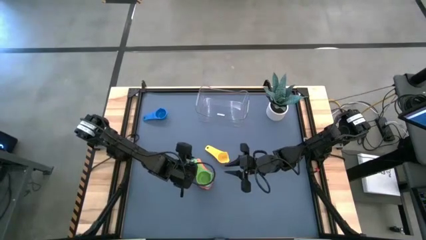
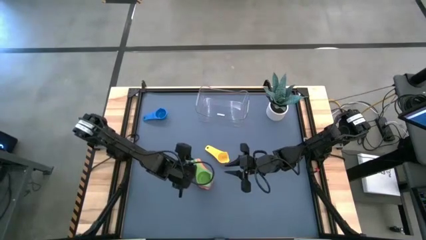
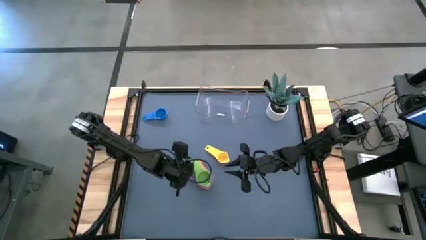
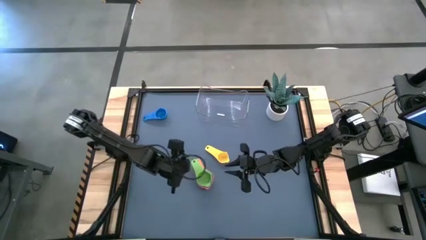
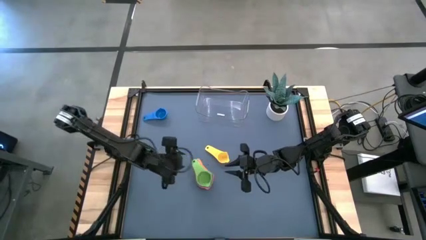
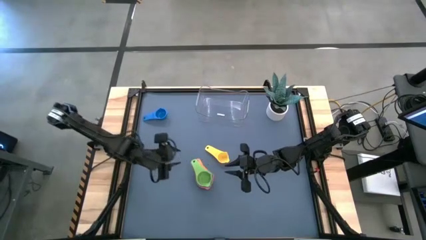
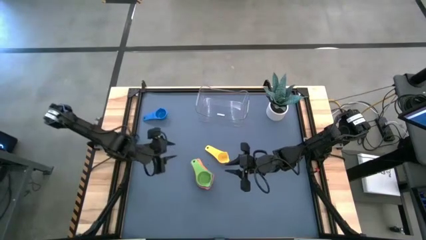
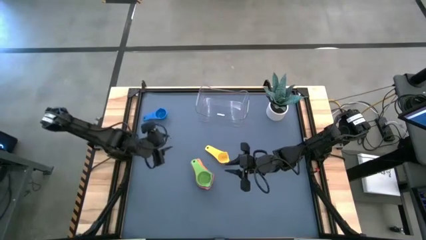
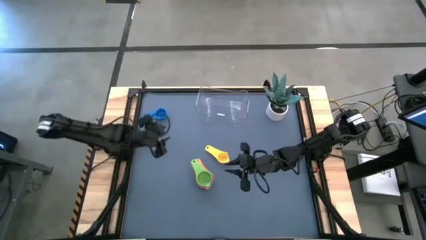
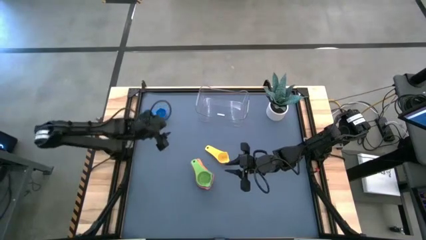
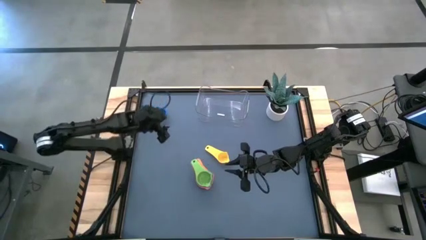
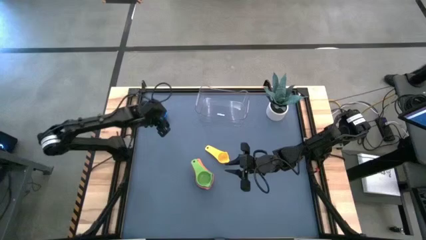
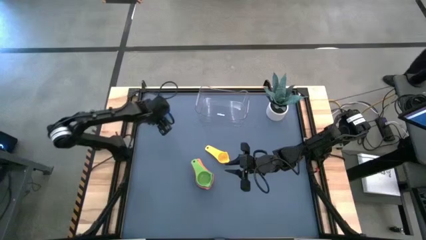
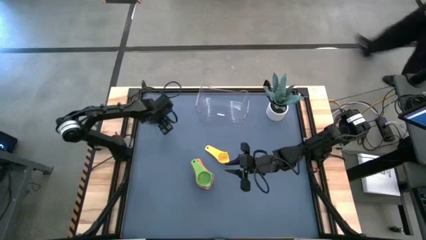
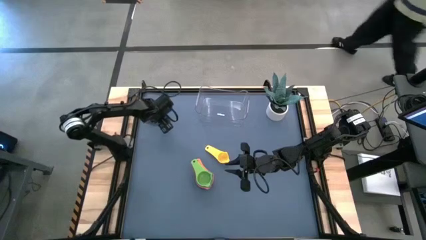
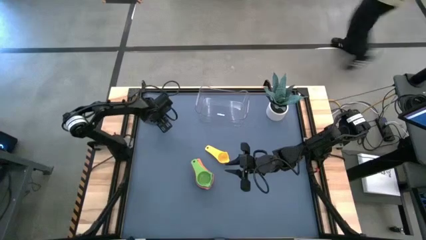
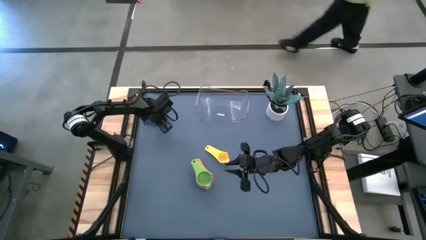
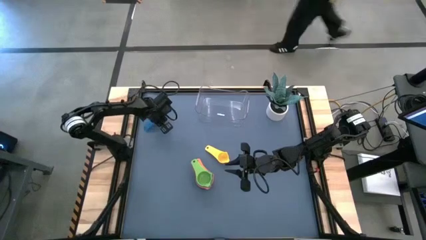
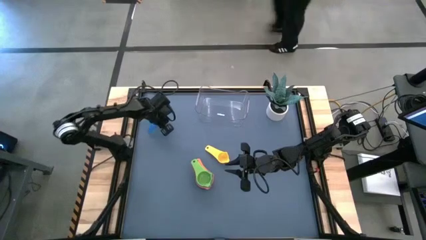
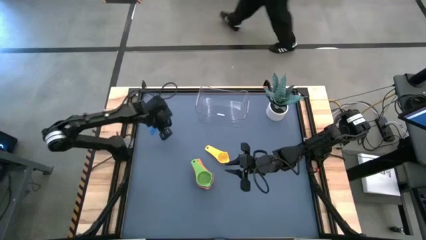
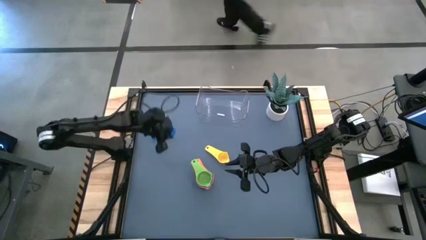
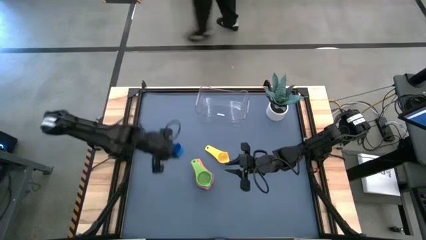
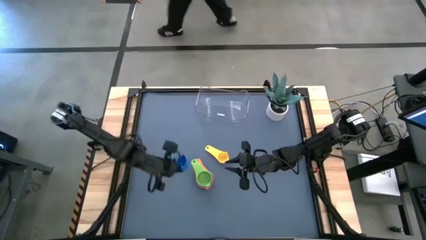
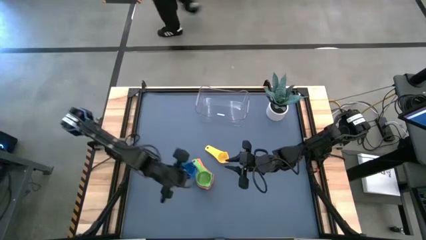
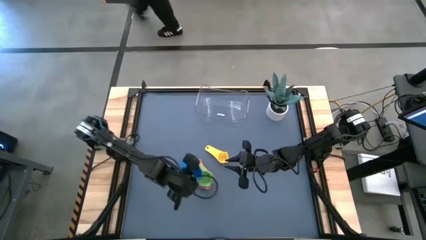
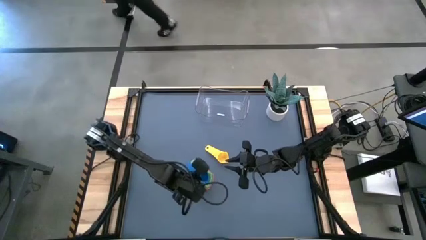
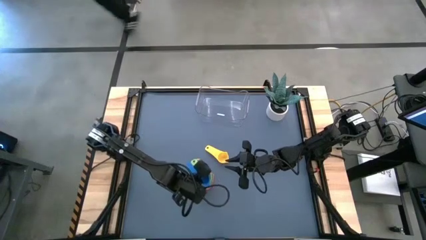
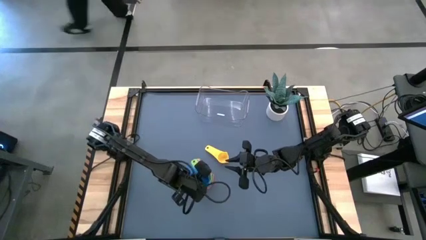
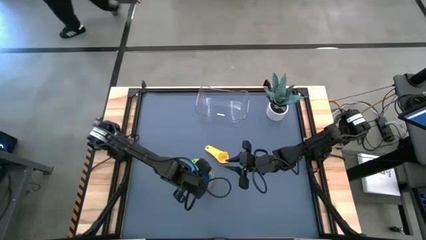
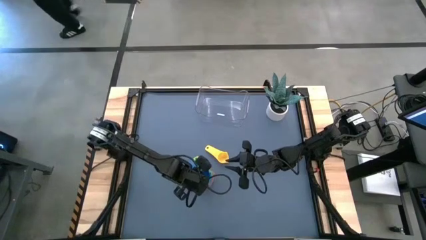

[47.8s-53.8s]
Task: Nest measuring cups in basket
Stack the blue measuring cup on top of the green measuring cup

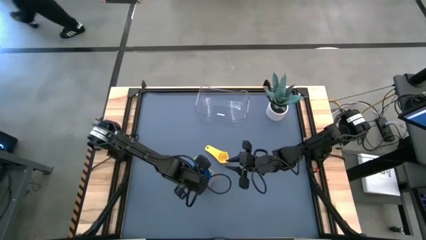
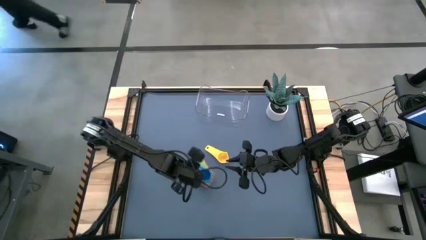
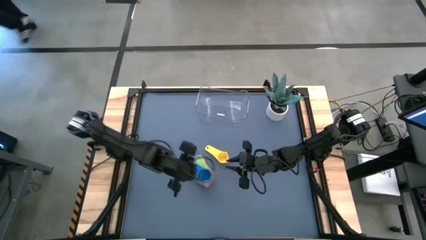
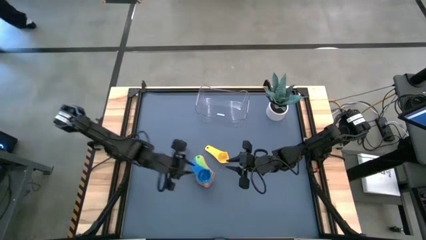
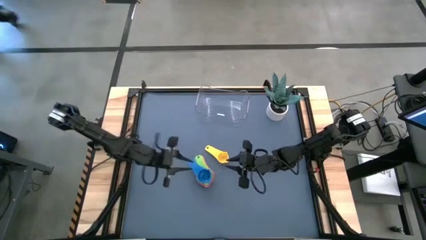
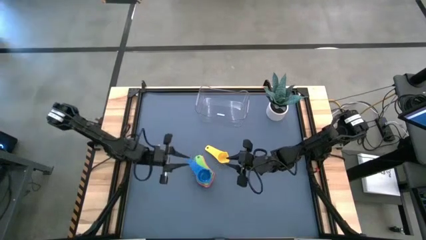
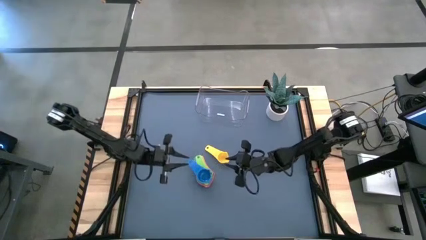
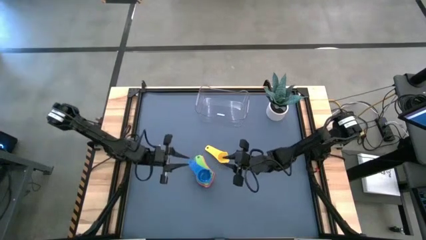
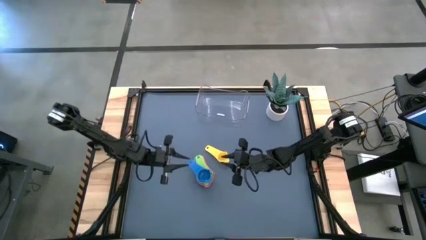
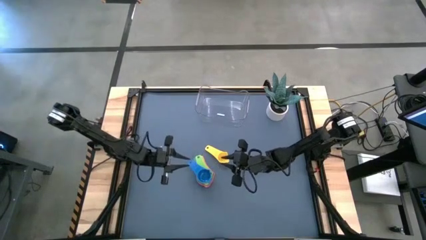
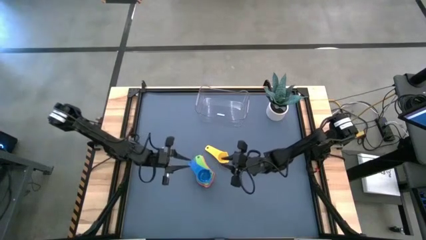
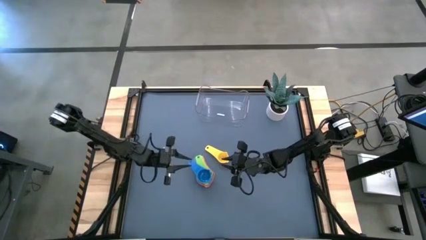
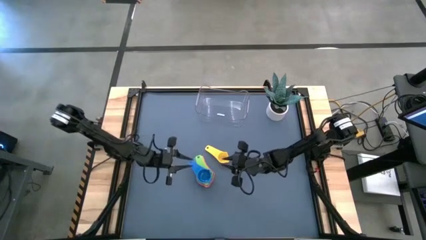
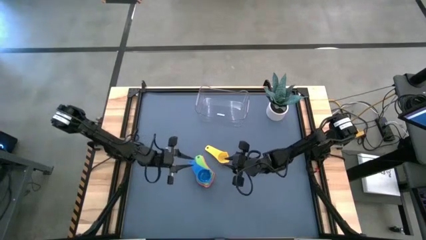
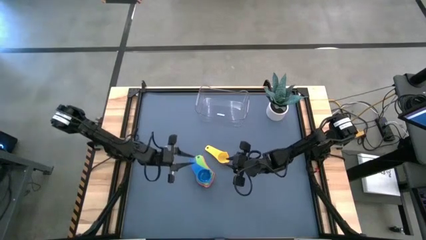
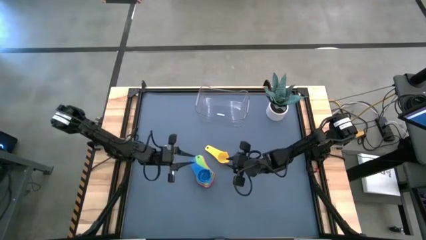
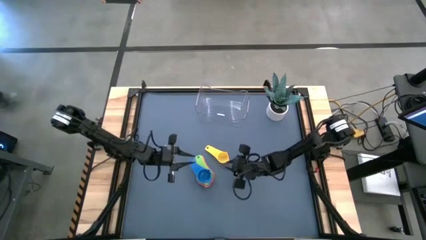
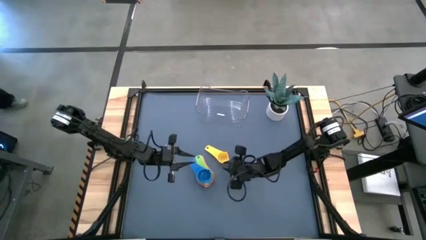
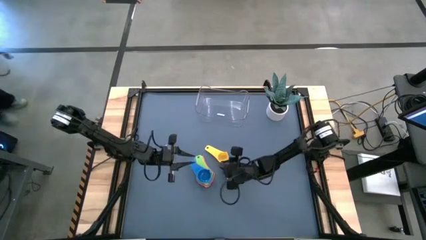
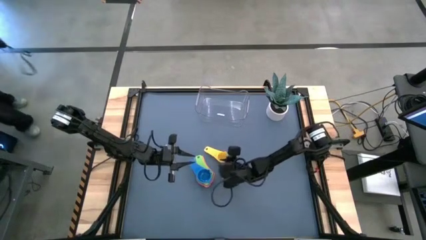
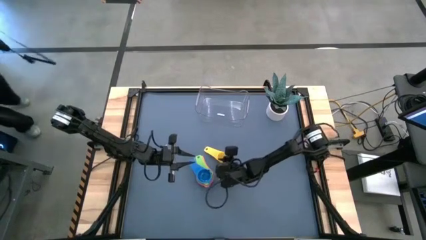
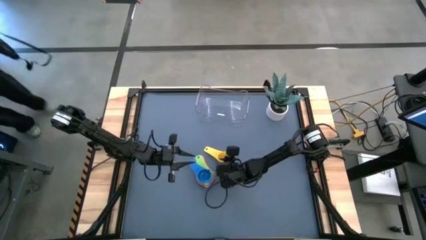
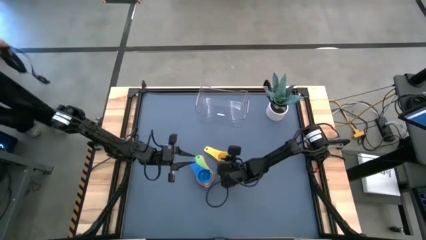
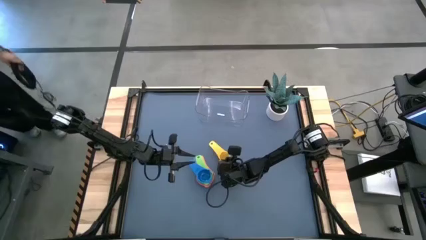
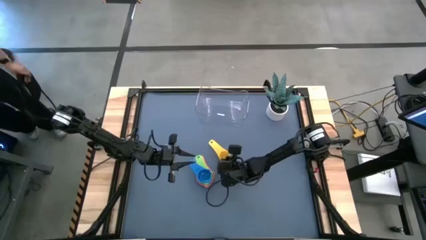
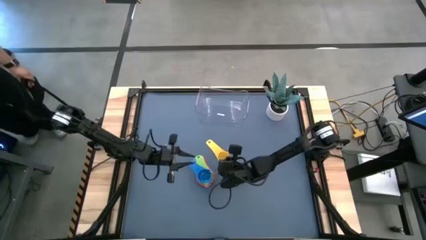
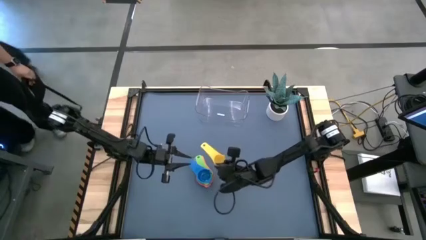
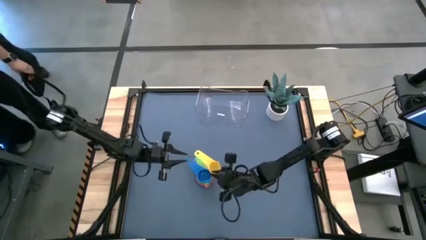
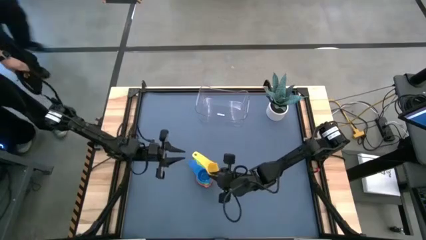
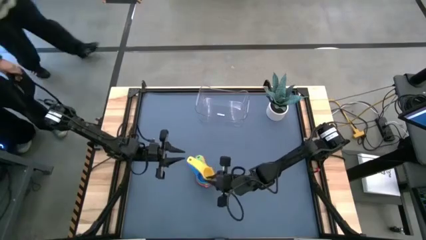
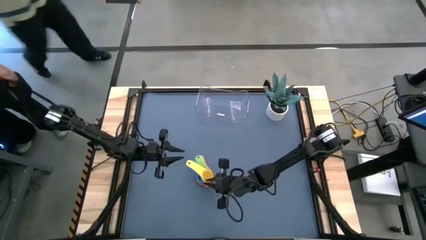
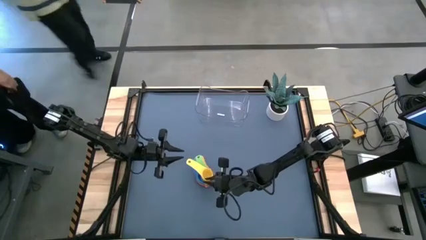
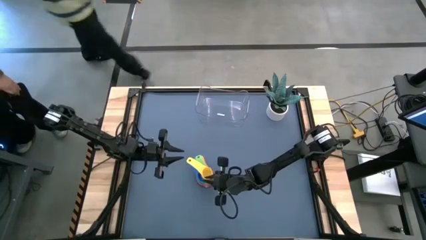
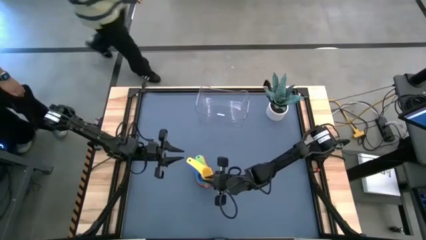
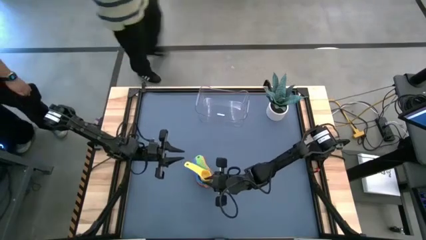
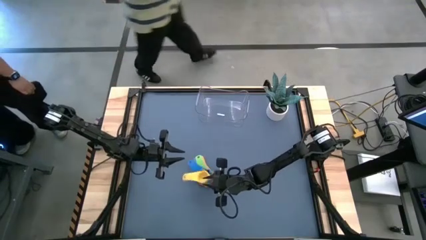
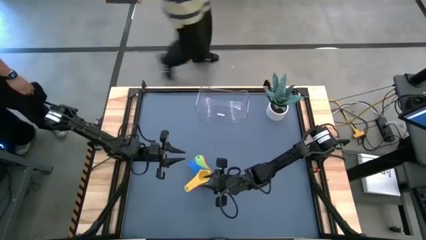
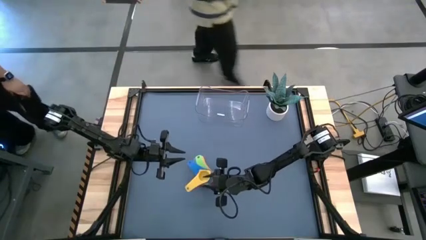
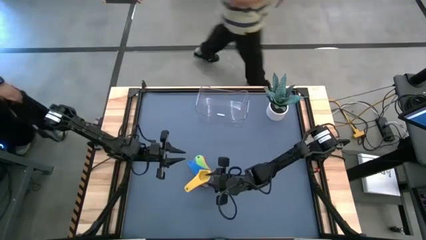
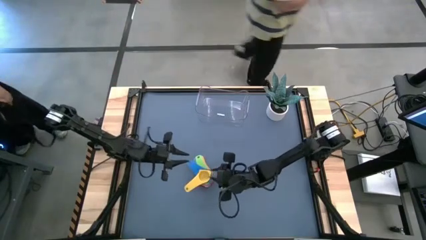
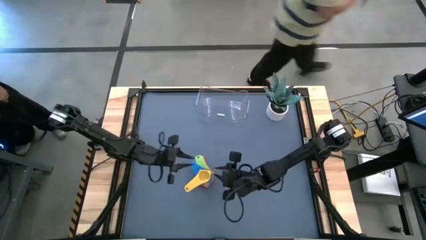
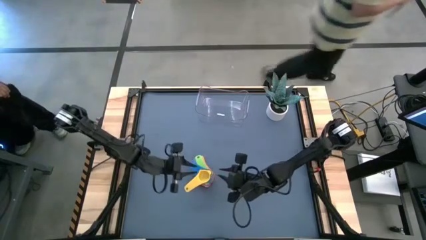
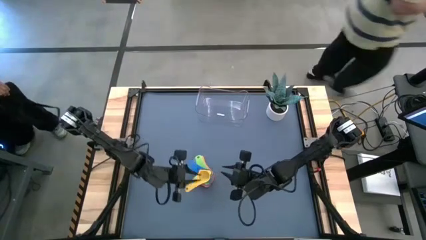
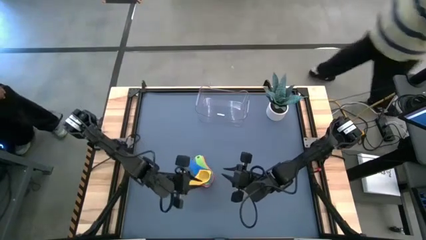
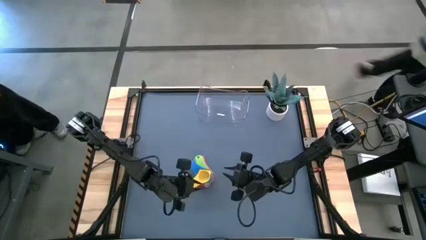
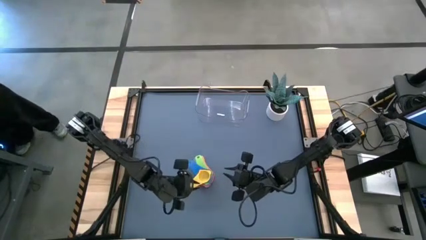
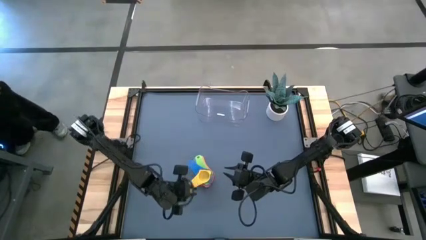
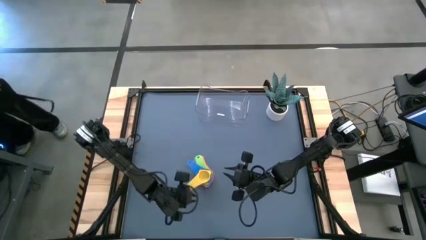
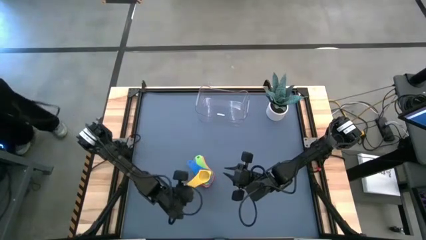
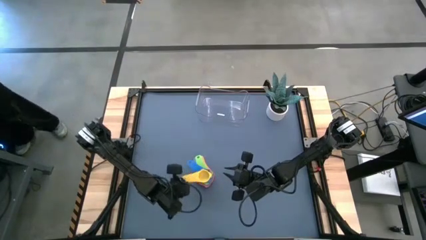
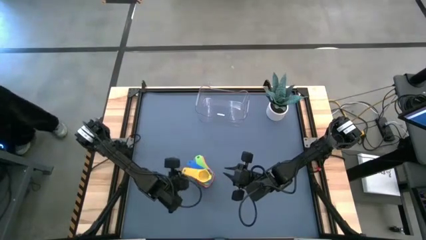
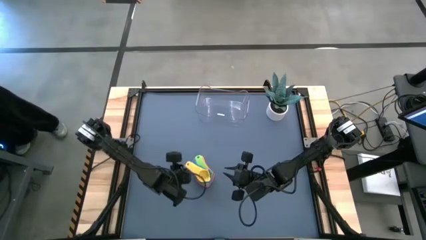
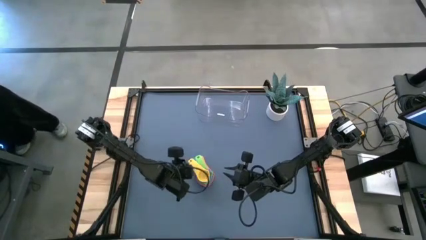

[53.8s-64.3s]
Stack the yellow measuring cup on top of the blue measuring cup
